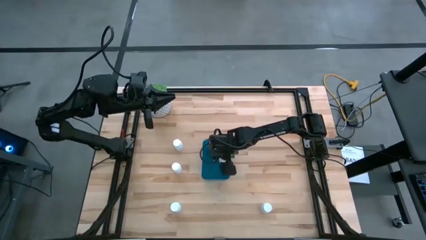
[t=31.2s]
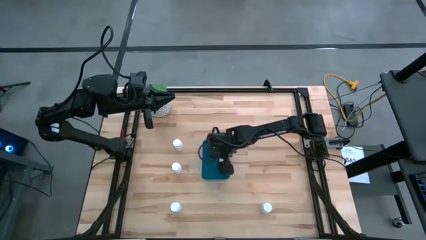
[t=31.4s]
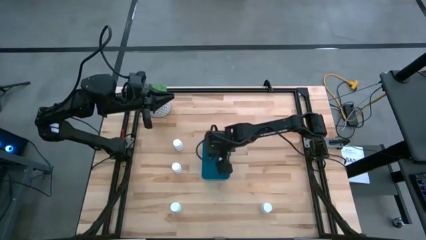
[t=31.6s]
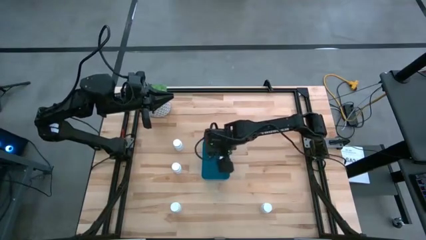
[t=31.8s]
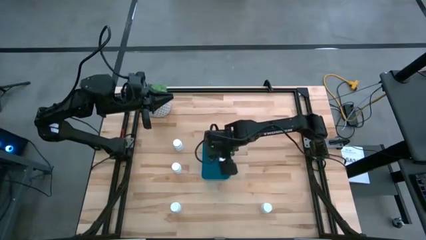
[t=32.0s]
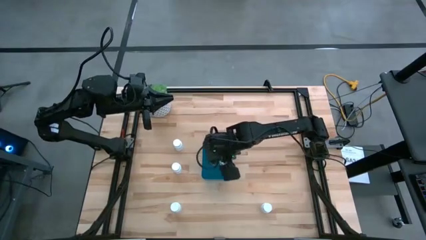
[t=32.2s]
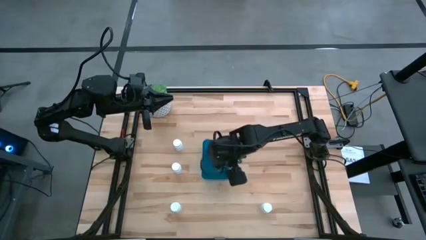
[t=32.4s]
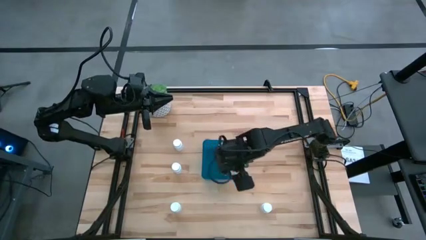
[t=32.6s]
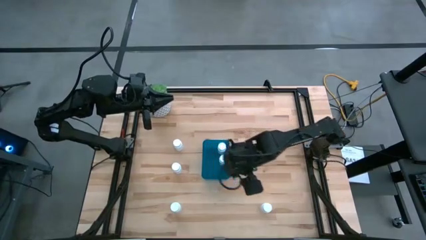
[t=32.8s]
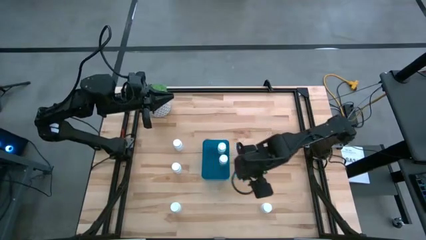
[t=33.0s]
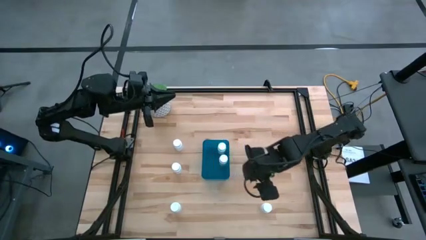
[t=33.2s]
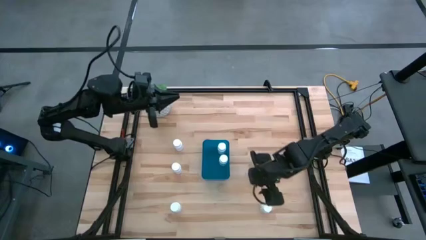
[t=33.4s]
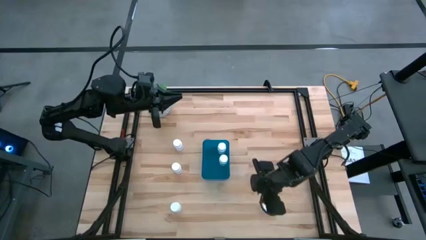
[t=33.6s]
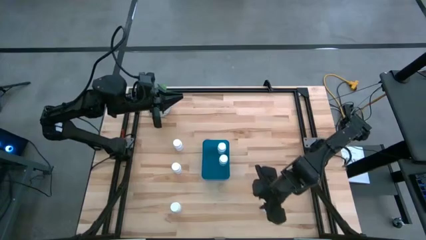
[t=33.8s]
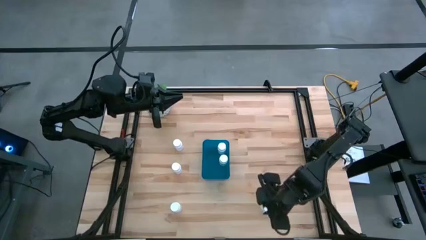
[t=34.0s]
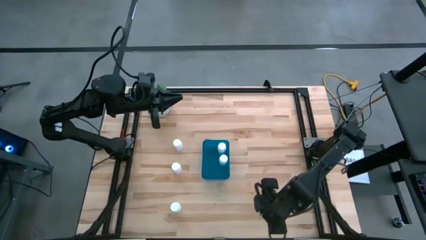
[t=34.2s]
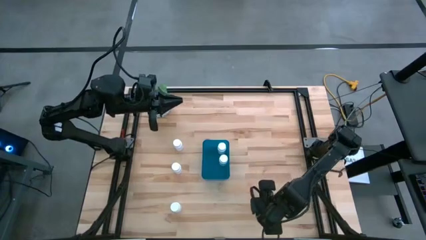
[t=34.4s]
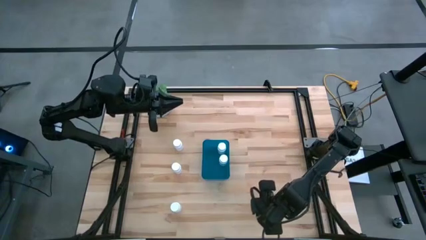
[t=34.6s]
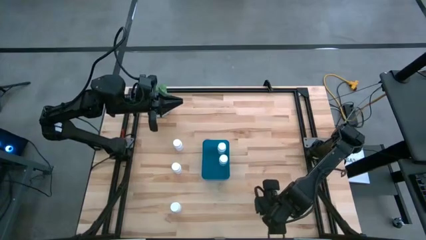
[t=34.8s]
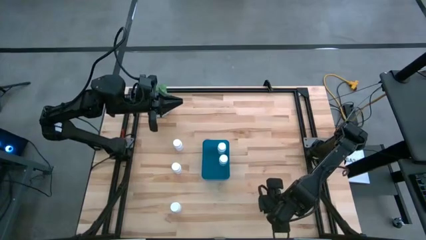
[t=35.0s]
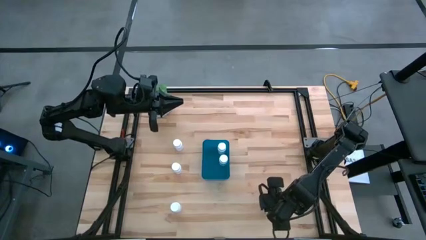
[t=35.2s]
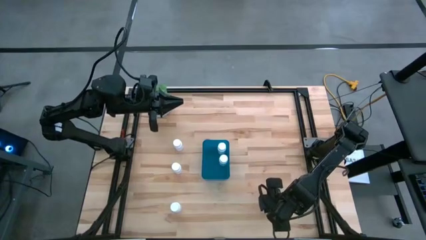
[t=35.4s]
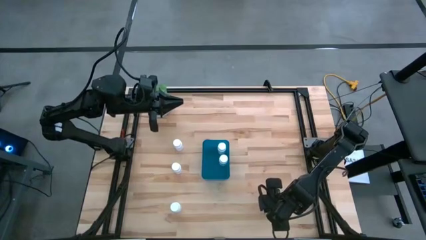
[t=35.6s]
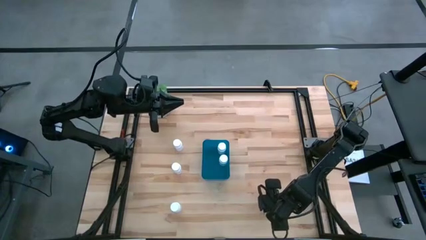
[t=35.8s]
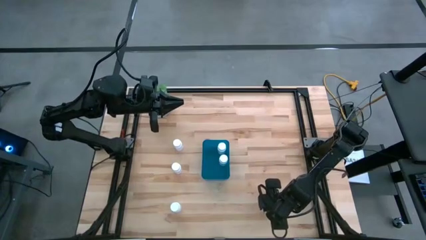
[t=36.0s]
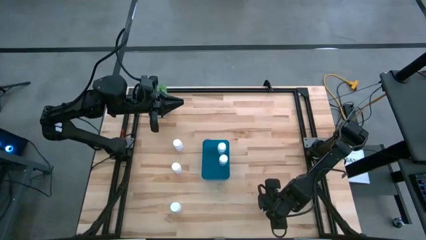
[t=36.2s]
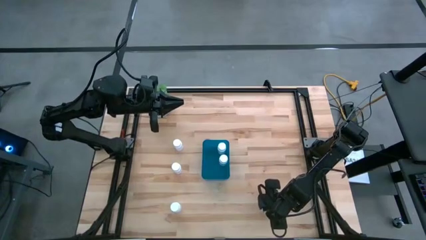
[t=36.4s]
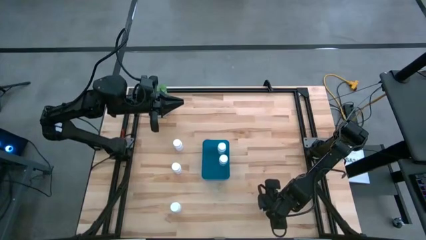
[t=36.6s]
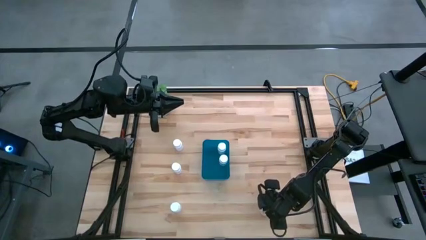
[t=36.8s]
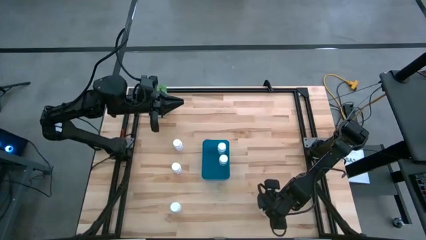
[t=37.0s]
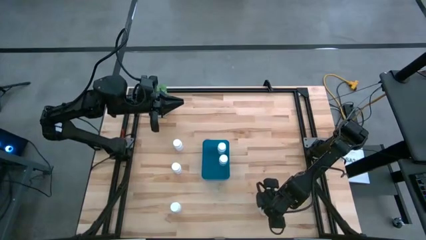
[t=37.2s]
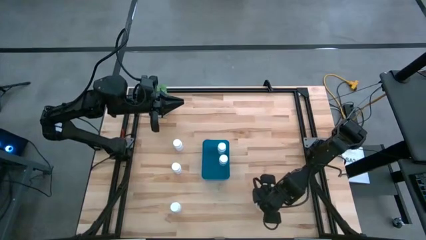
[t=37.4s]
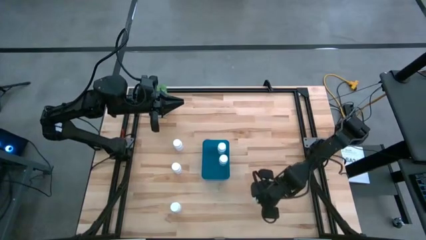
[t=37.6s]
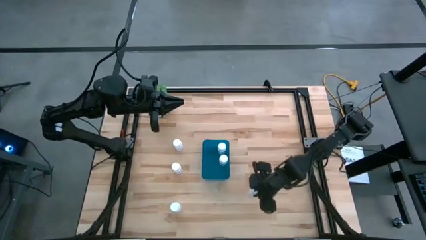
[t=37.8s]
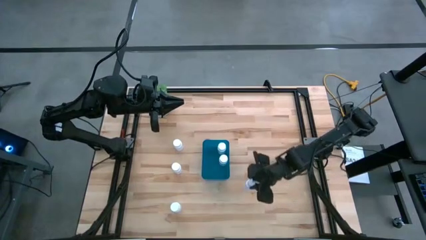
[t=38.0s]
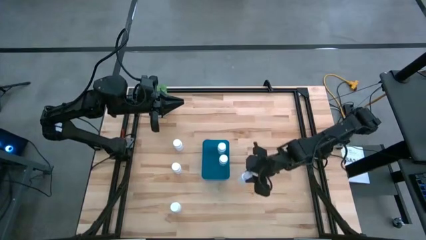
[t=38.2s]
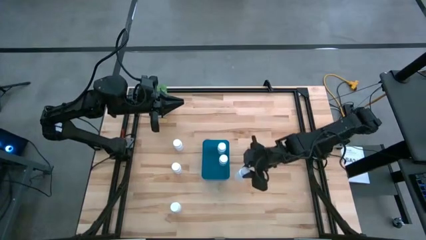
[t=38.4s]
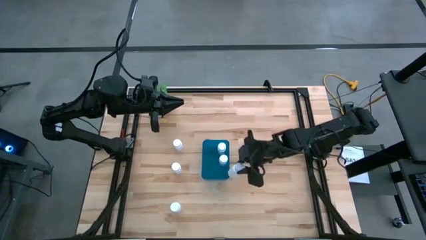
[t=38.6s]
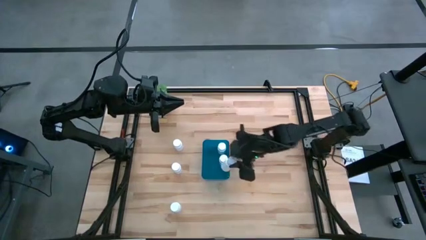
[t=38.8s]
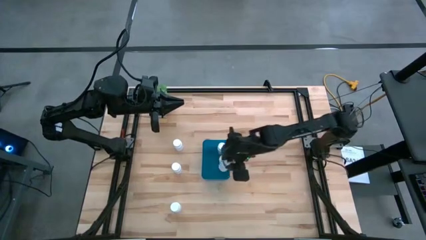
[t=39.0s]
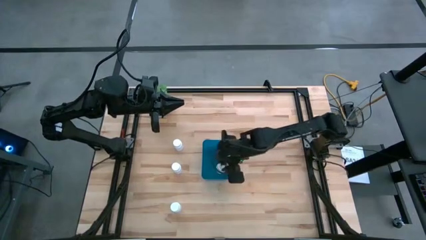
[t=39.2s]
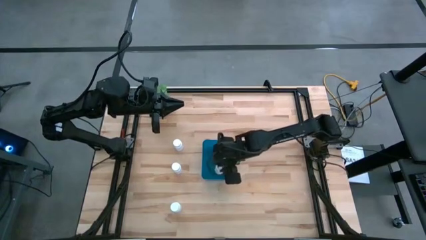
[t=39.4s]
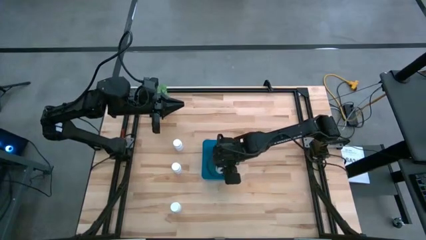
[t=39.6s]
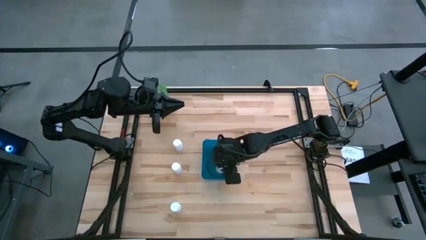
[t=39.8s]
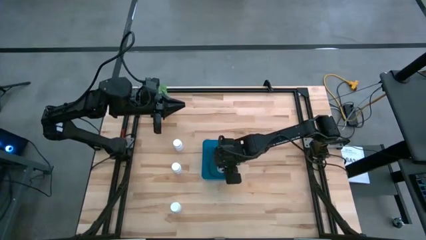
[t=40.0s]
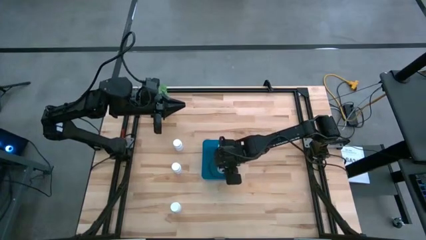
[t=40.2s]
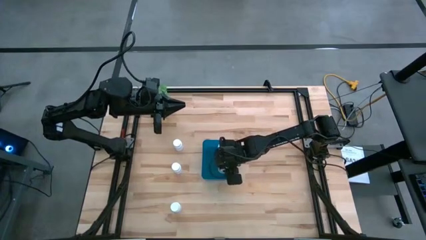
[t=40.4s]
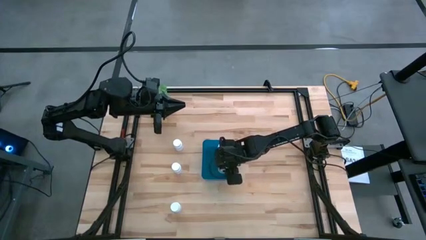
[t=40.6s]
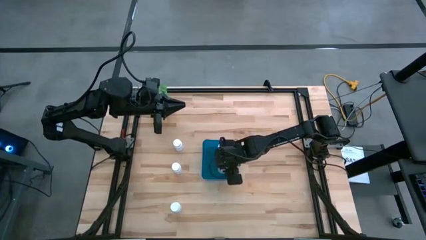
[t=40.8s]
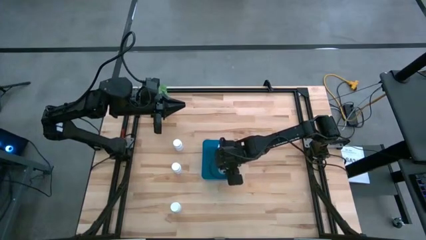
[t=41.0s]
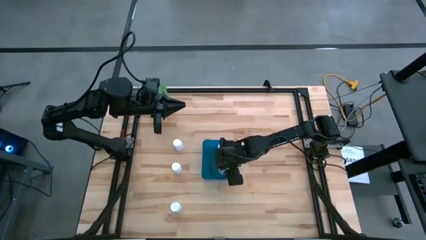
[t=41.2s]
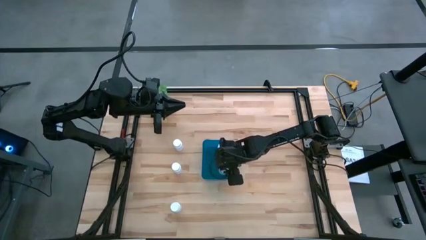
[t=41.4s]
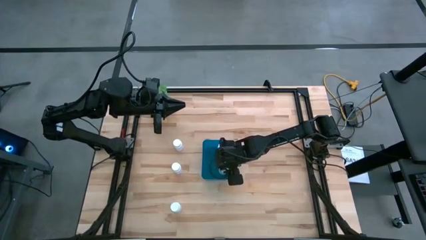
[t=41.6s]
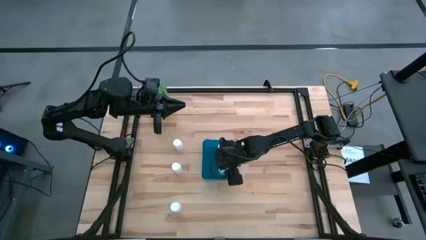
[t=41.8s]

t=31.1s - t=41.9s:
Task: Pick and place pill bottles into a basket
Put the white medicine bottle into the blue bin

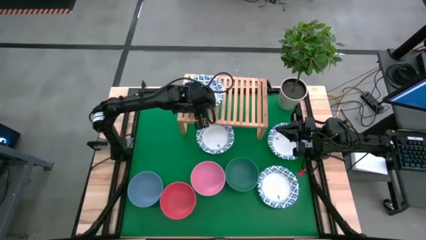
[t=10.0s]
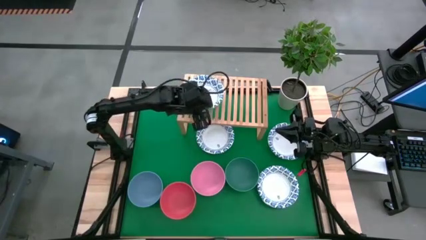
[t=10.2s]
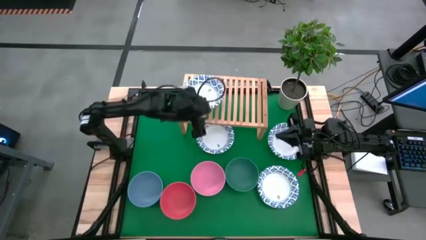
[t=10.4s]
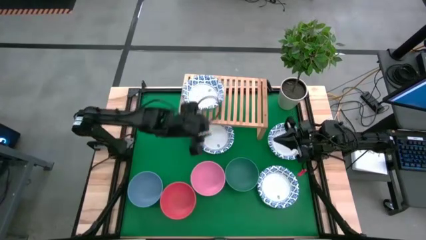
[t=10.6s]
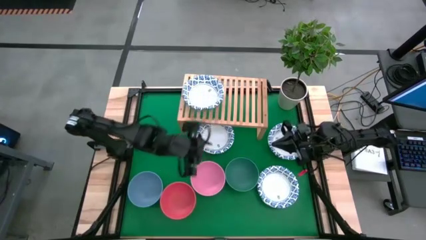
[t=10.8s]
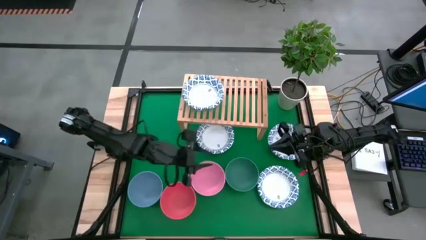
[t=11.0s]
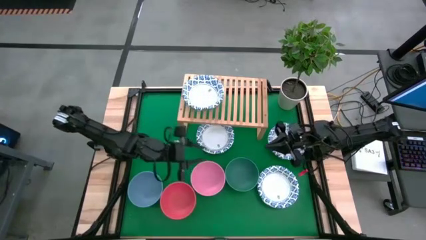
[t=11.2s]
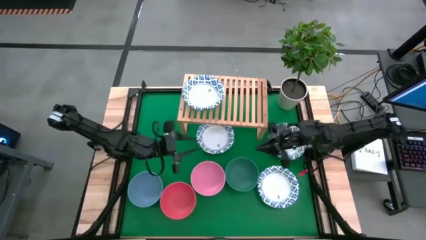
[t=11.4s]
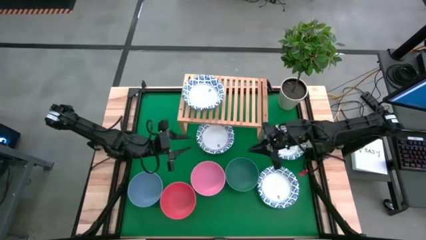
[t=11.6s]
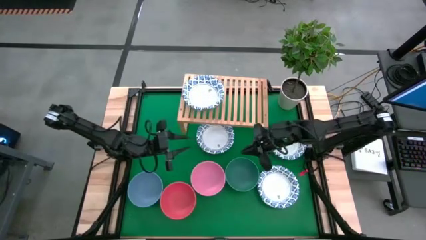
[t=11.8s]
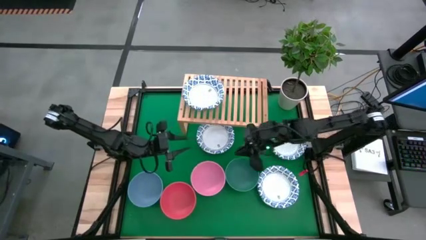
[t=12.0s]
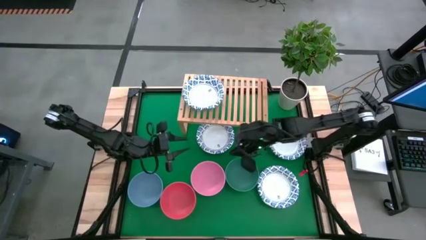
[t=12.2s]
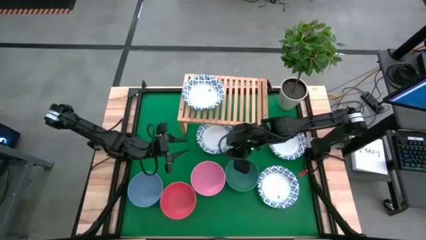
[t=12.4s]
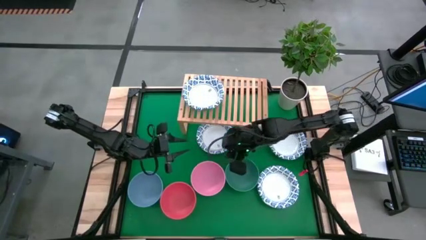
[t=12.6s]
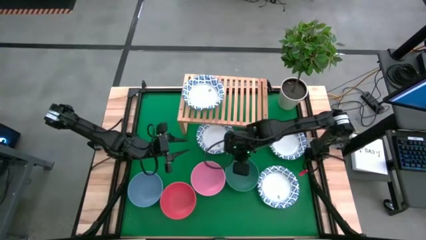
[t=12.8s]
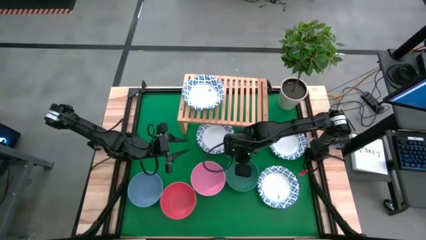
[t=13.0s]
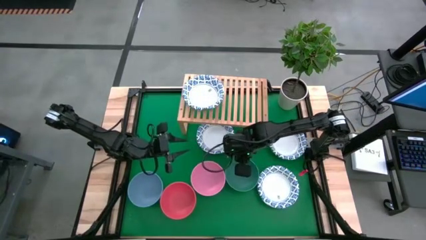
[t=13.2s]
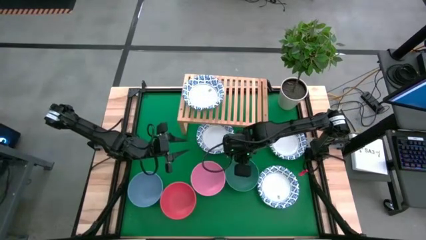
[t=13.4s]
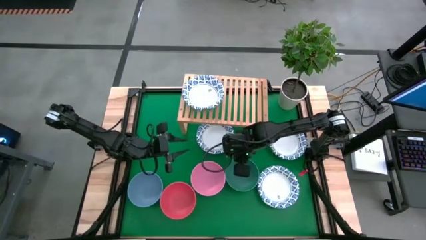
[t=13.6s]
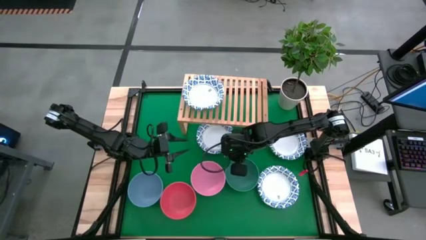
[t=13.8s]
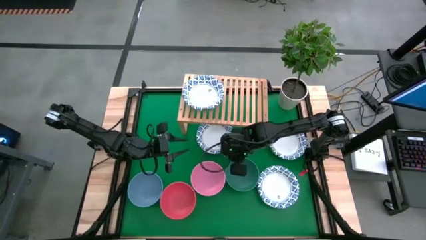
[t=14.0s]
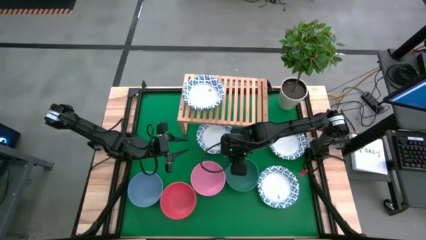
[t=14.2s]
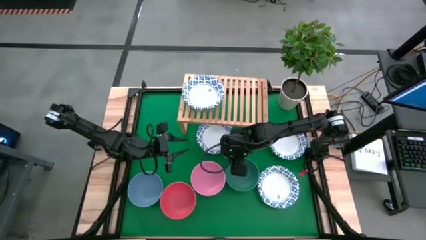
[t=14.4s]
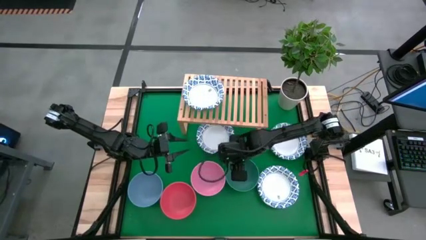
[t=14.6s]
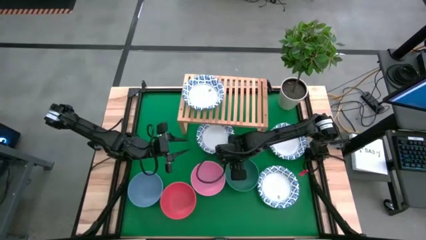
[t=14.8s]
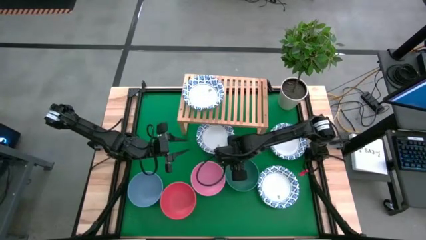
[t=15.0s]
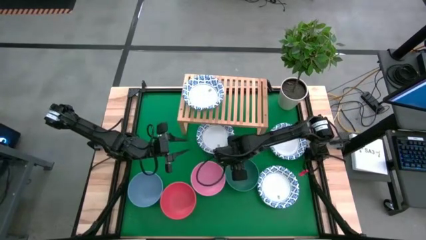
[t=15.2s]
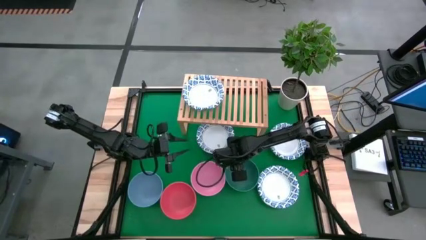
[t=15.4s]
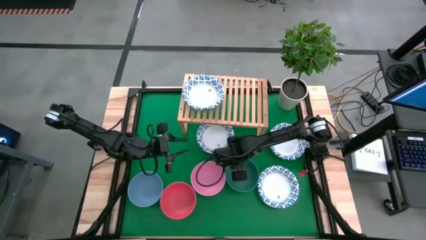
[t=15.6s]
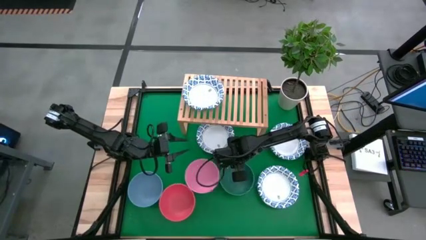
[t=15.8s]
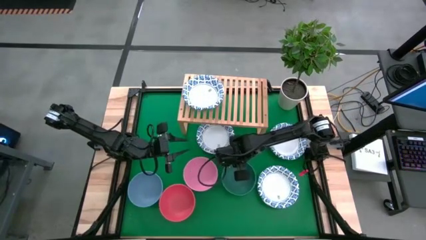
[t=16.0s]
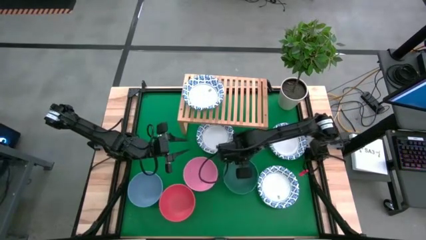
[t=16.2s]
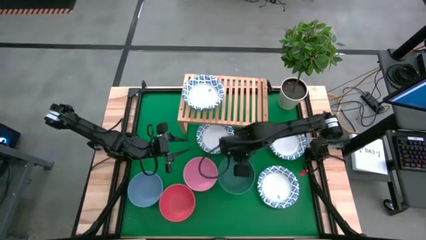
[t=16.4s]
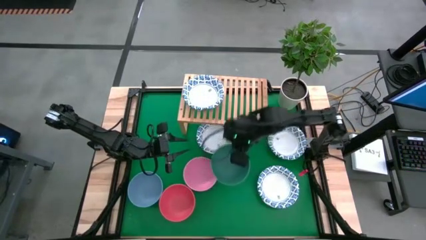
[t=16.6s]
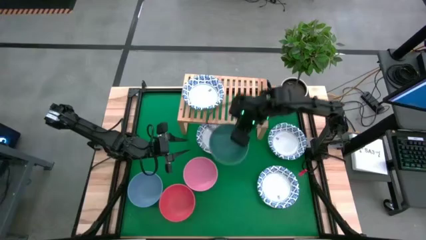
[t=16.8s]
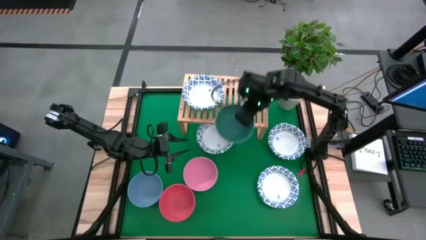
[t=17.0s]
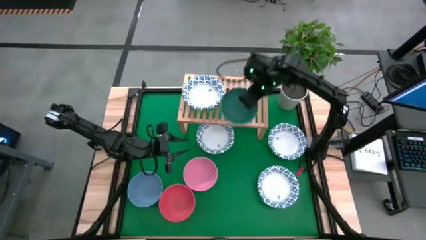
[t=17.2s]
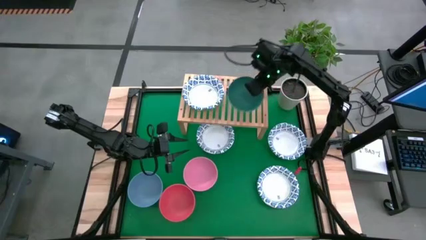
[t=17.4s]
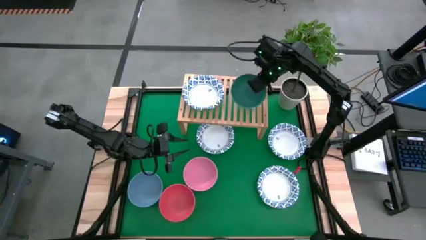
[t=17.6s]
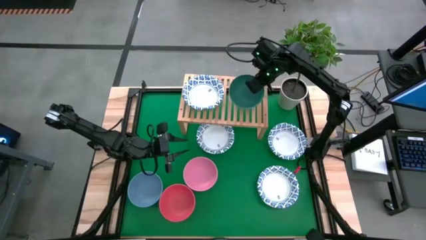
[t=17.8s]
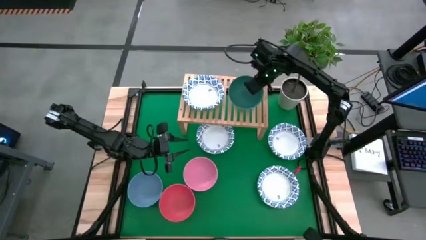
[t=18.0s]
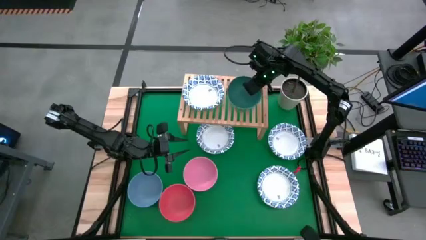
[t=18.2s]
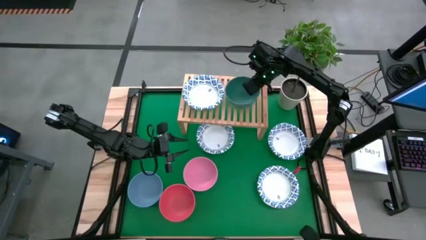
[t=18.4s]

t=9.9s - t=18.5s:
Task: Place and stack bowls onto a shelf
Put the green bowl on the shelf
